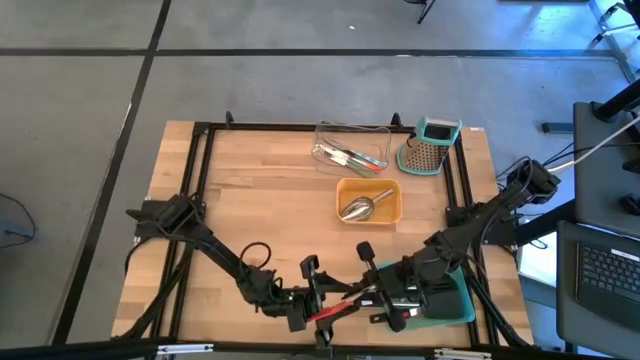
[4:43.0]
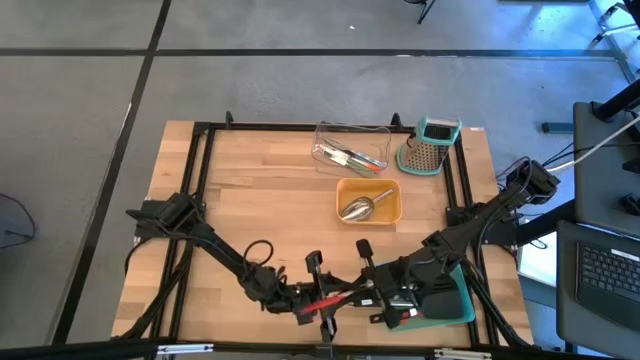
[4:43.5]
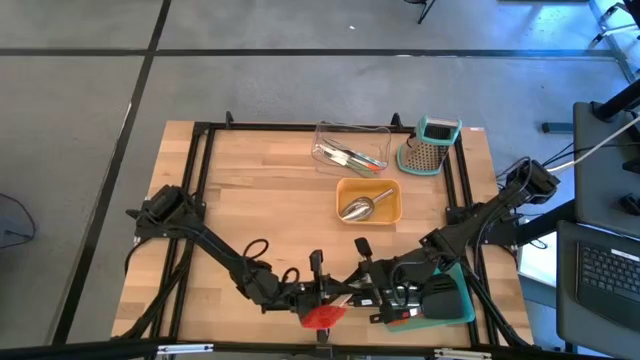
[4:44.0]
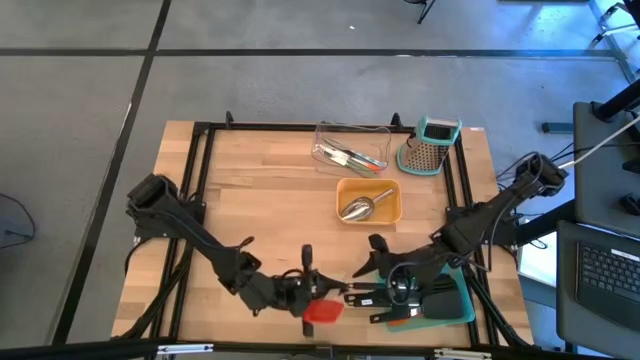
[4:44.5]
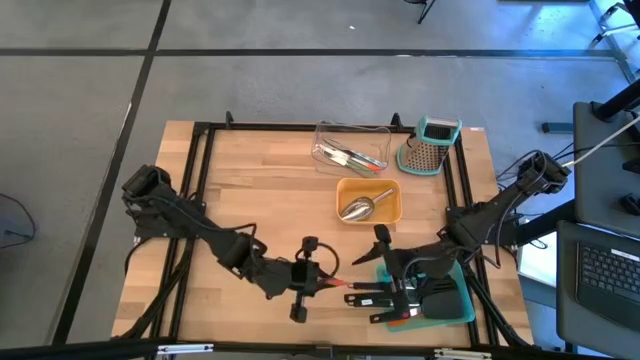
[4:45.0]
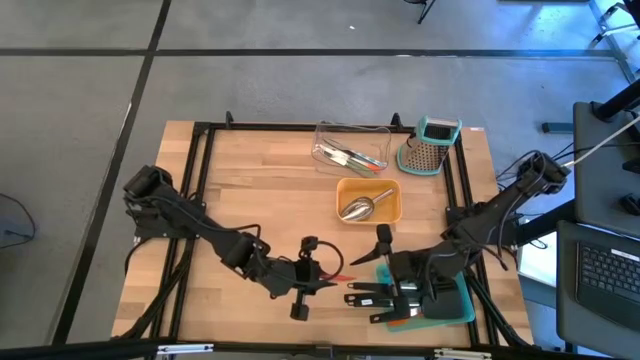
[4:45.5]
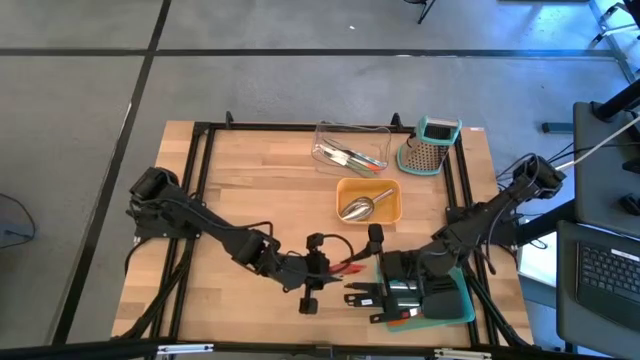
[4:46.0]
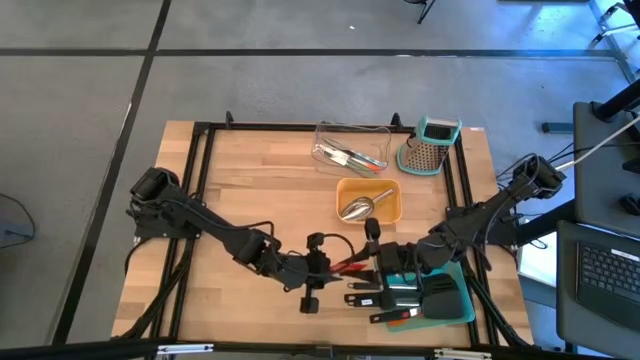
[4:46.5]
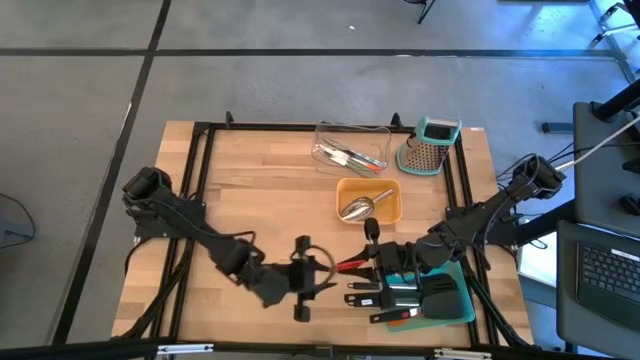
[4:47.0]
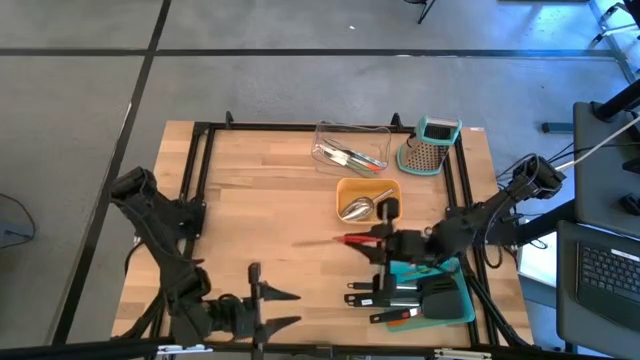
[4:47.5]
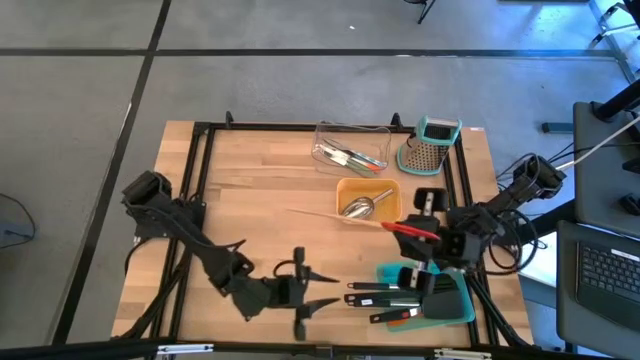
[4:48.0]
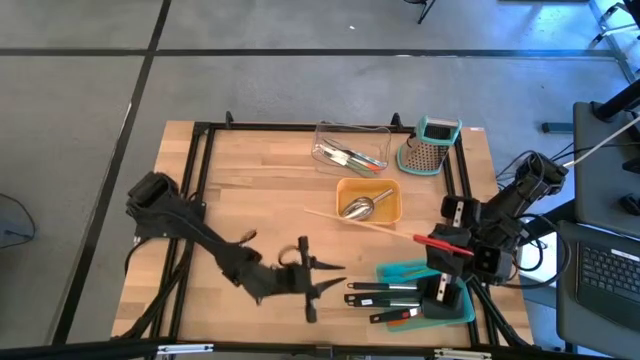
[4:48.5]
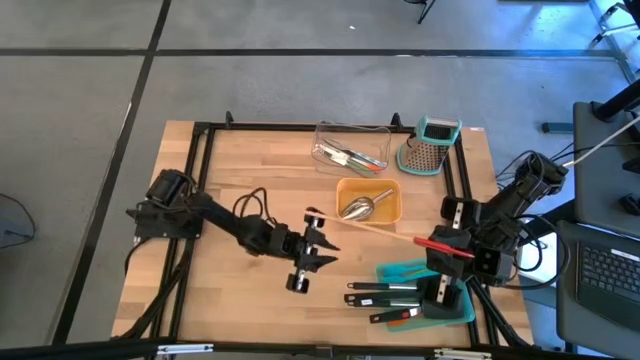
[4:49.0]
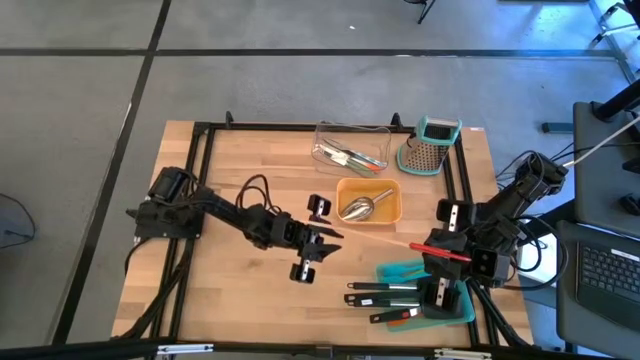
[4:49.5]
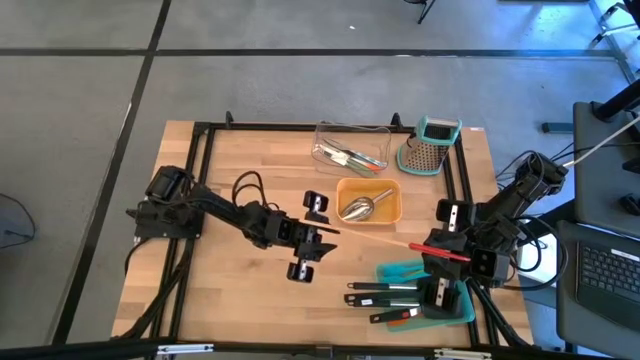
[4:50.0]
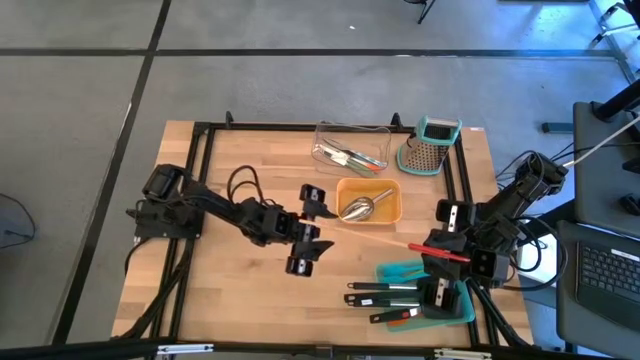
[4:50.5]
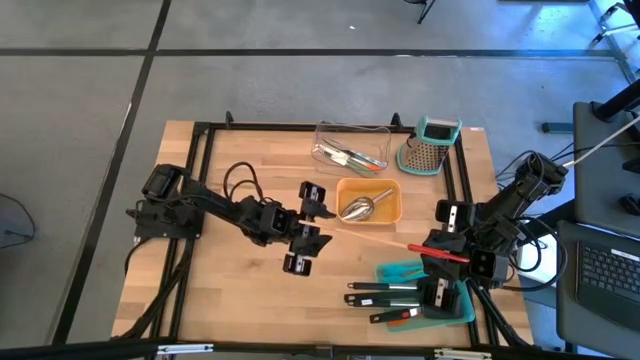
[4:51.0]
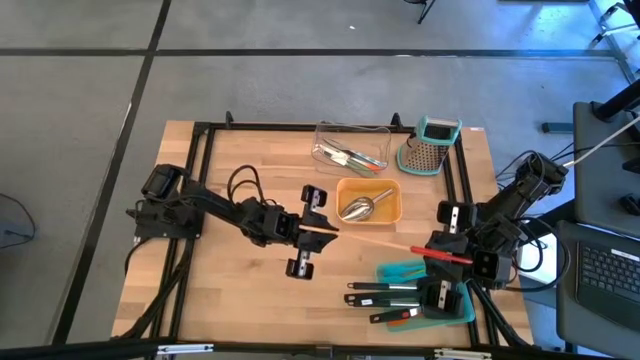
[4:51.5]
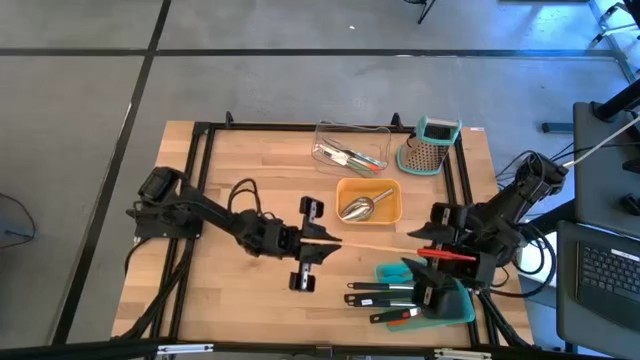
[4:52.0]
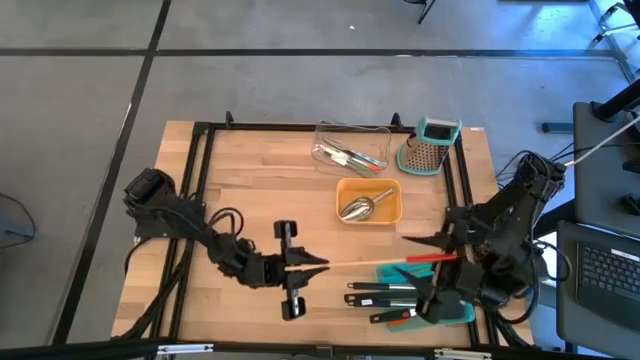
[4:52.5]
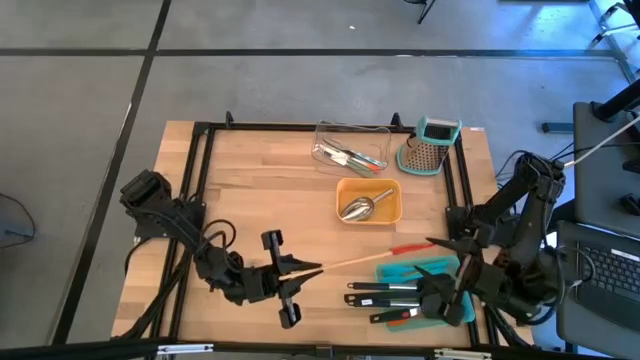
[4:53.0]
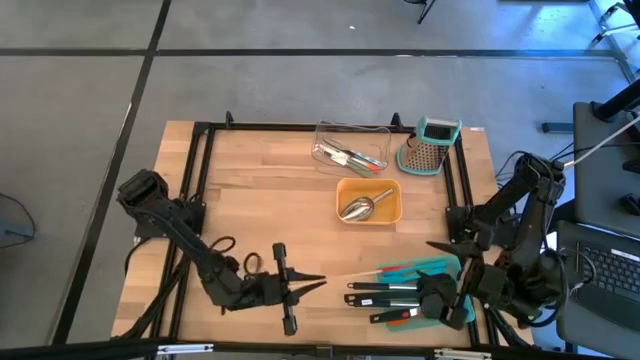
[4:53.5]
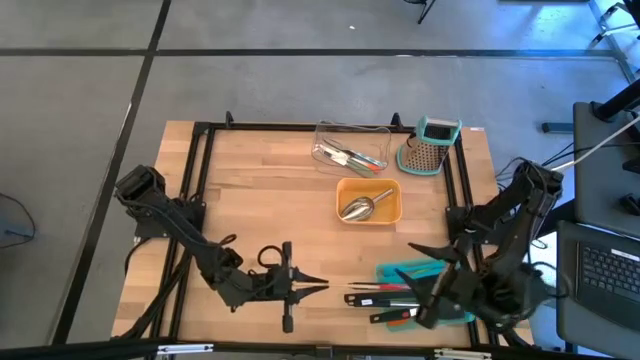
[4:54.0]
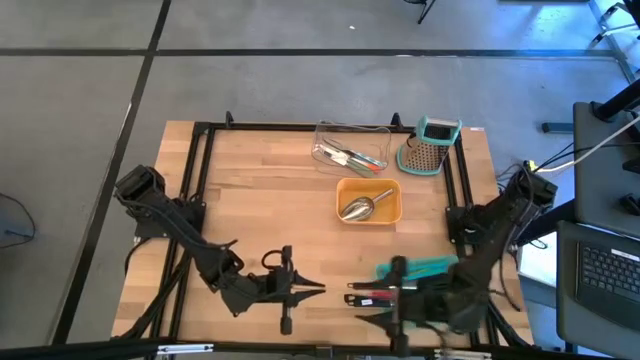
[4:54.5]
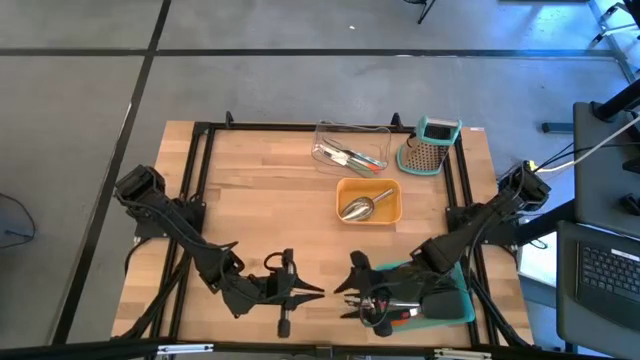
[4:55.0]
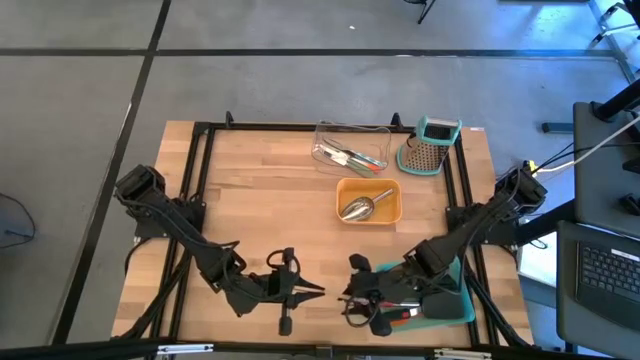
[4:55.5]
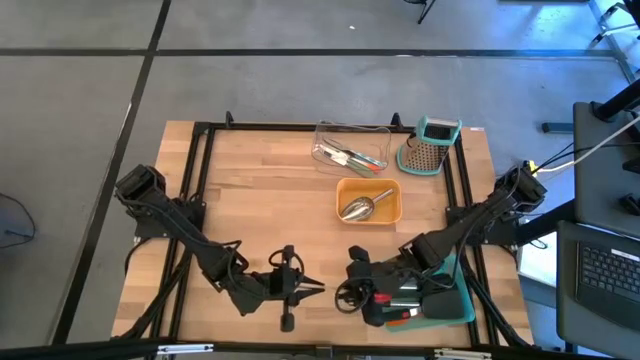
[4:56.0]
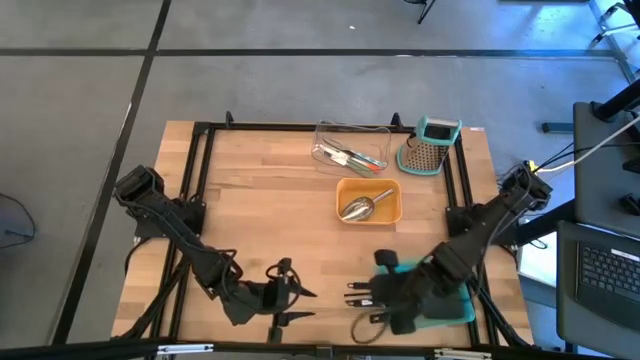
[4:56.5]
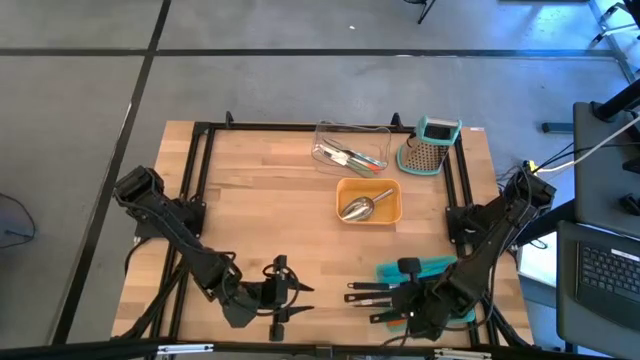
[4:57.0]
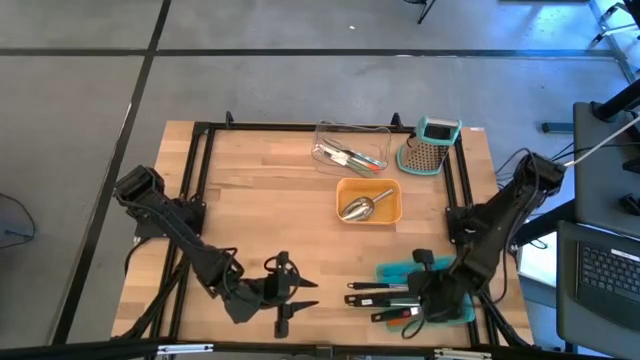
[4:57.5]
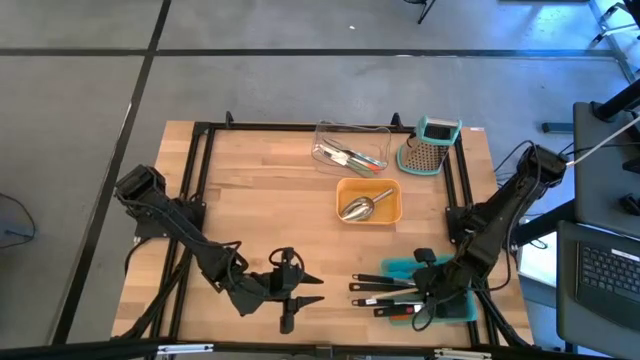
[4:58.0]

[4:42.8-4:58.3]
Task: Pick & Place Kitchen Items
Put the red spatula into the green bin

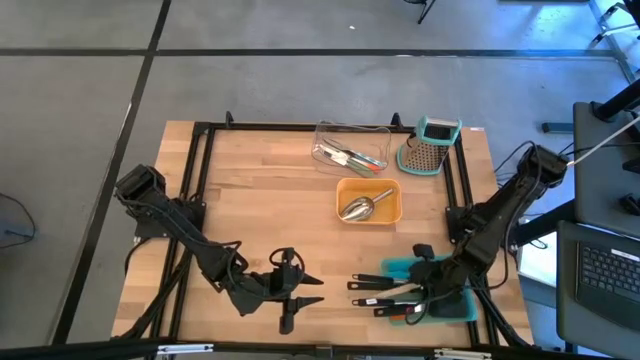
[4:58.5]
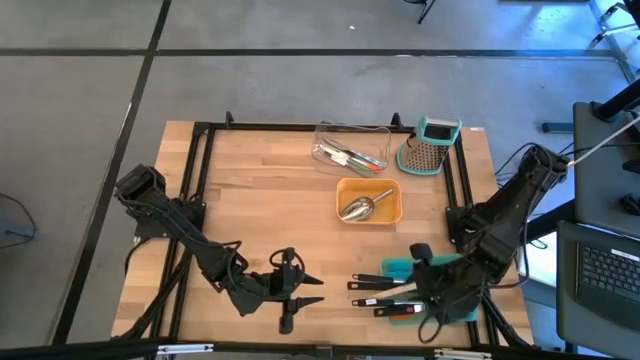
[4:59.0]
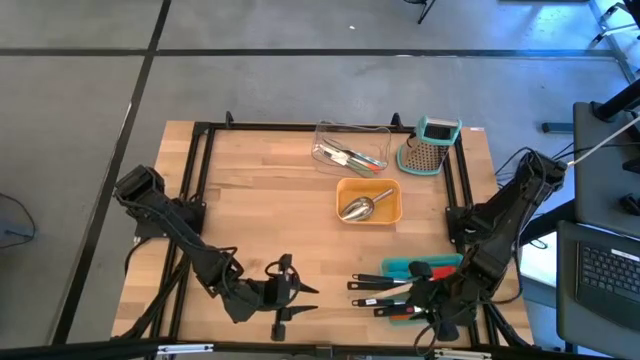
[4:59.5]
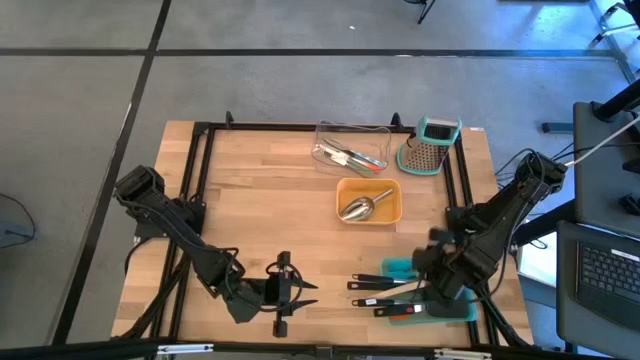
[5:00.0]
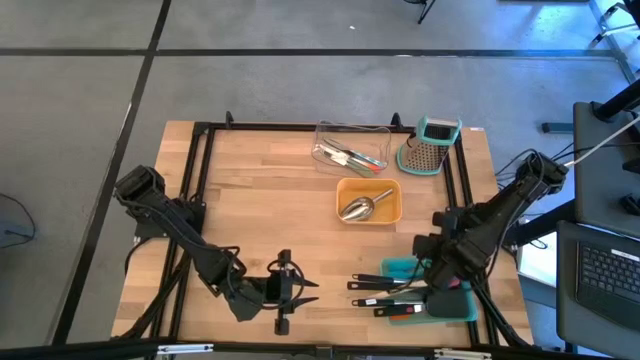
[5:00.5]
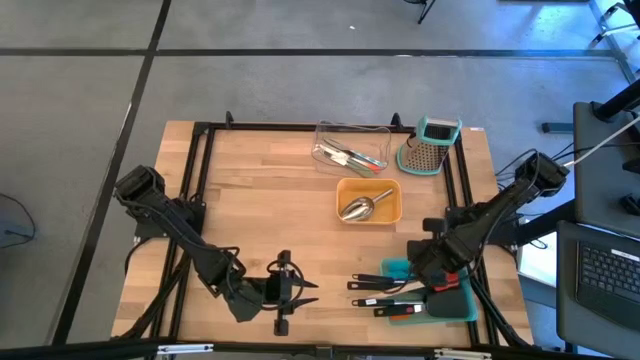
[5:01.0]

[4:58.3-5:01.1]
Adjust the blue bin

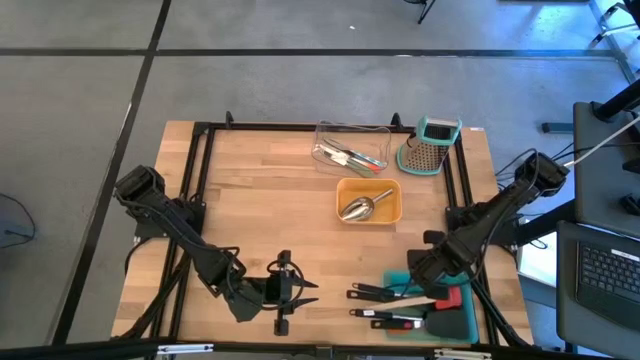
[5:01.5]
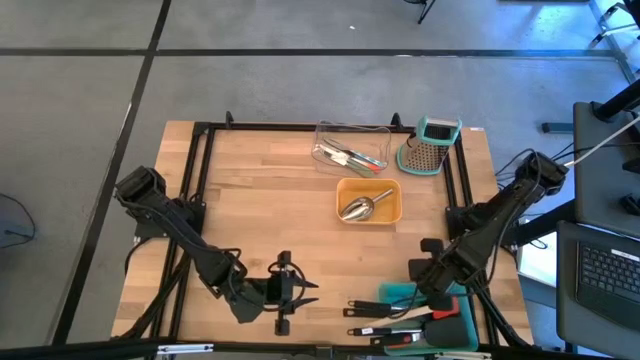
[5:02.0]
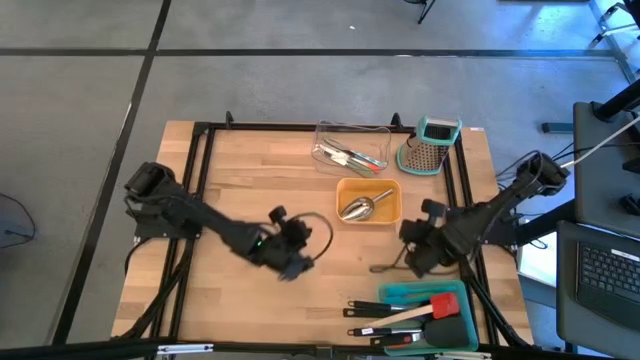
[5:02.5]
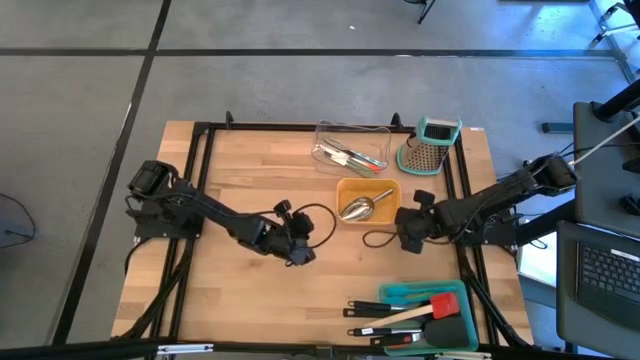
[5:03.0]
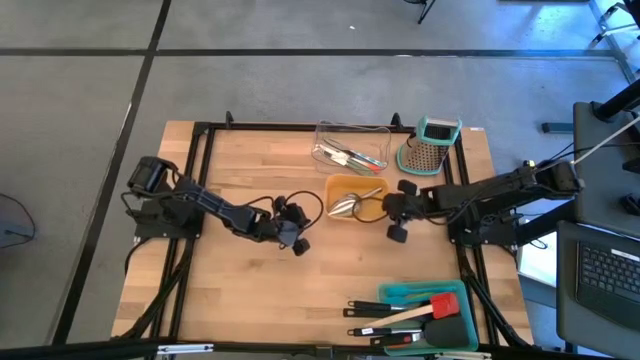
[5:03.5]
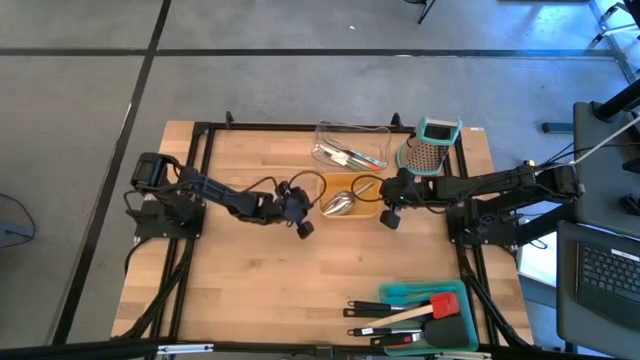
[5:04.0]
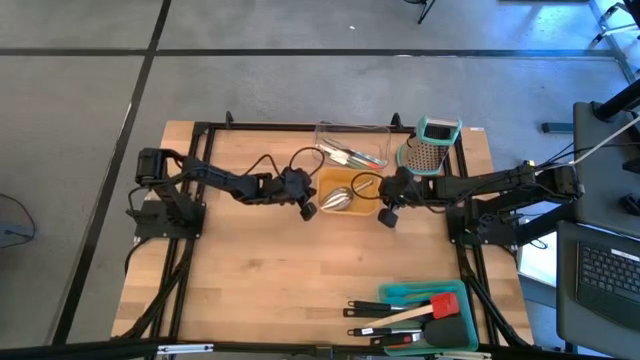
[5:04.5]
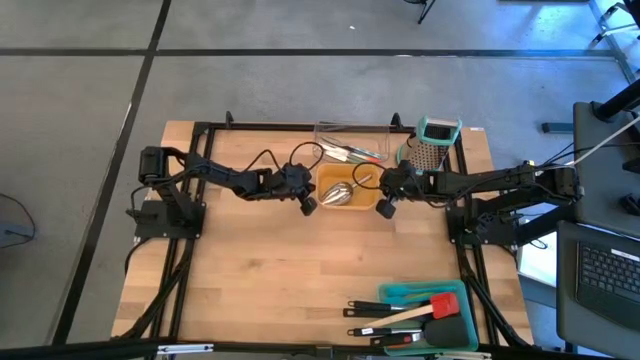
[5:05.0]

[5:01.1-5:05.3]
Adjust the yellow bin
